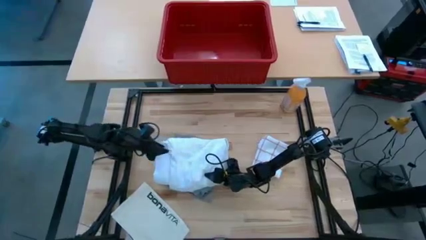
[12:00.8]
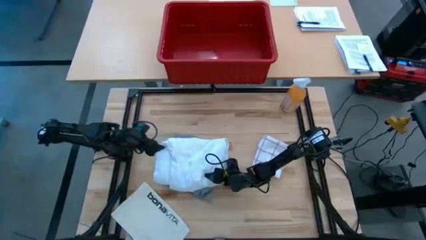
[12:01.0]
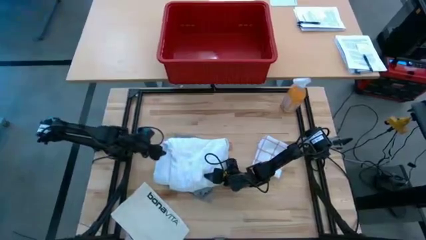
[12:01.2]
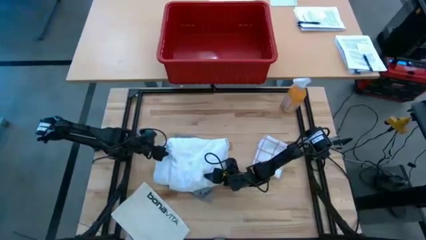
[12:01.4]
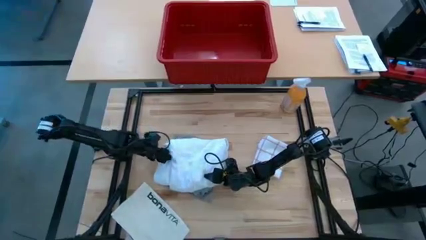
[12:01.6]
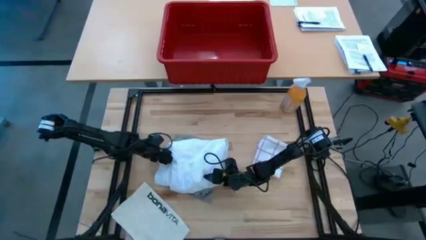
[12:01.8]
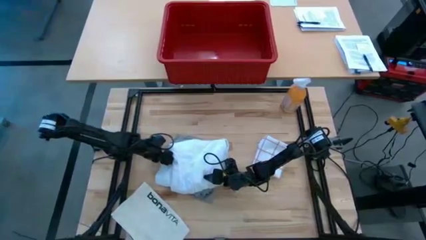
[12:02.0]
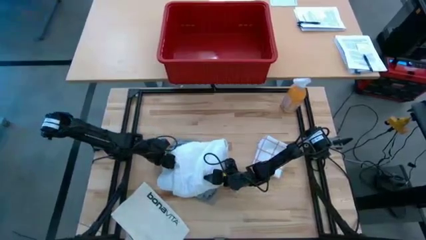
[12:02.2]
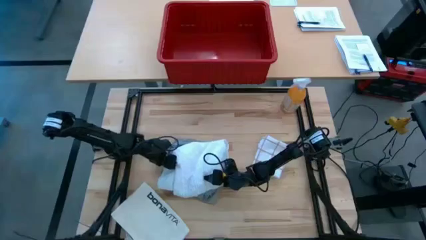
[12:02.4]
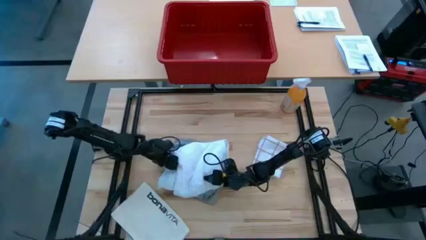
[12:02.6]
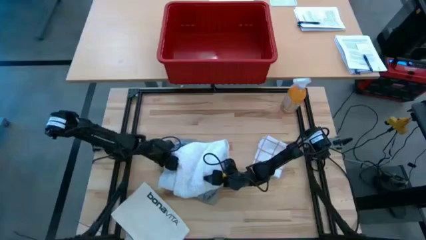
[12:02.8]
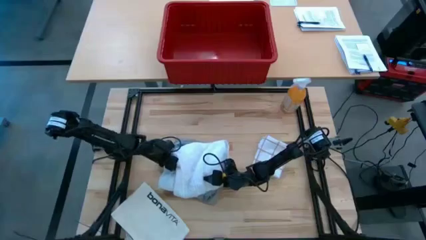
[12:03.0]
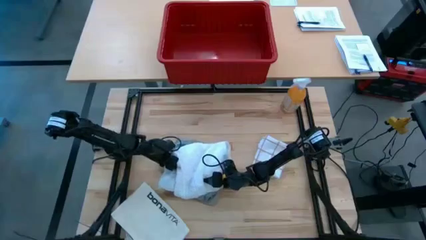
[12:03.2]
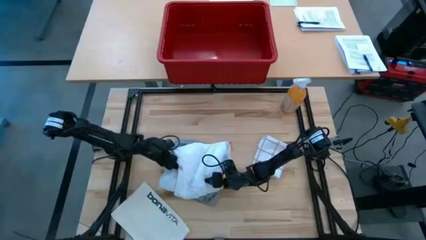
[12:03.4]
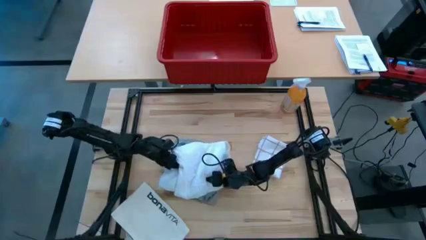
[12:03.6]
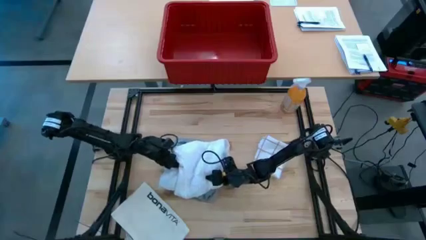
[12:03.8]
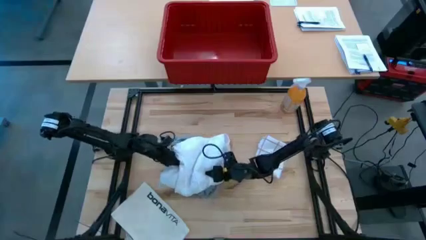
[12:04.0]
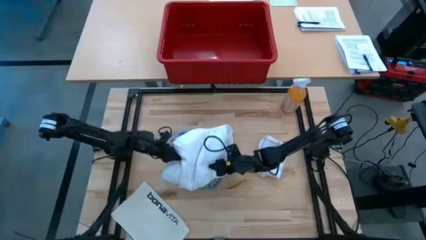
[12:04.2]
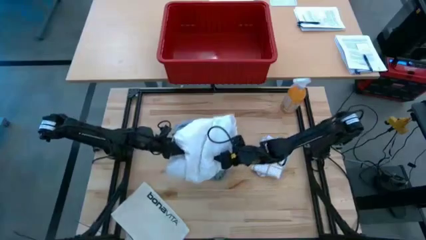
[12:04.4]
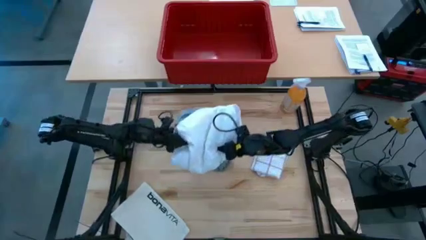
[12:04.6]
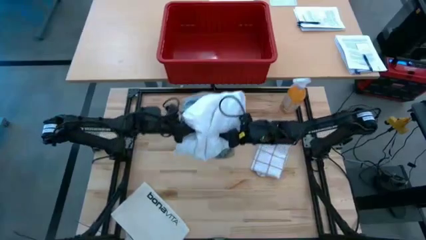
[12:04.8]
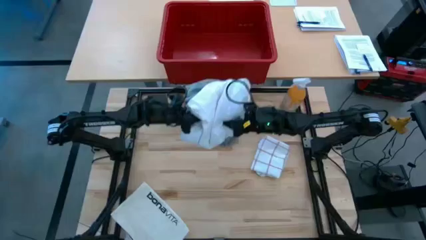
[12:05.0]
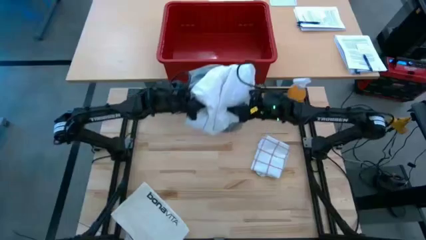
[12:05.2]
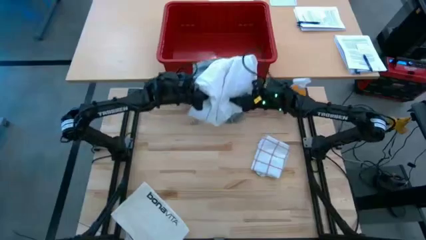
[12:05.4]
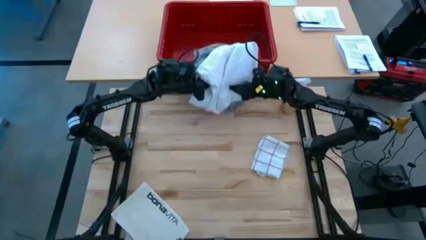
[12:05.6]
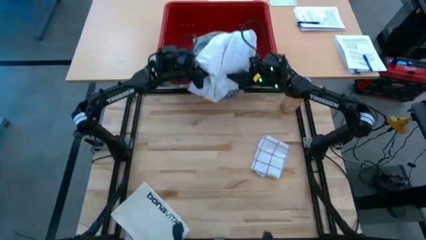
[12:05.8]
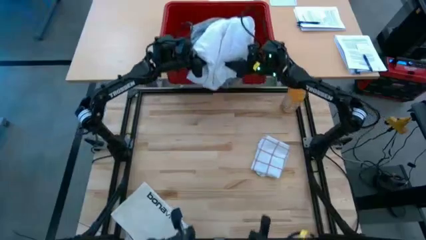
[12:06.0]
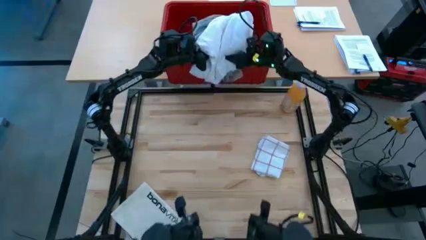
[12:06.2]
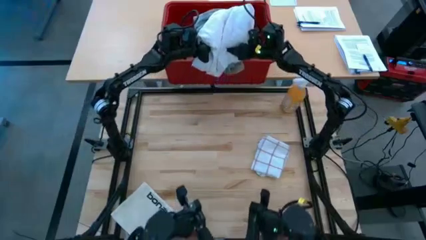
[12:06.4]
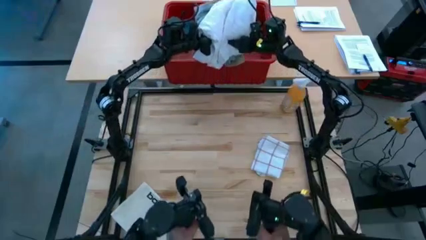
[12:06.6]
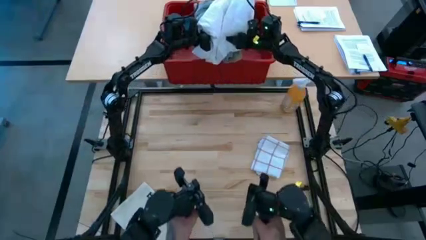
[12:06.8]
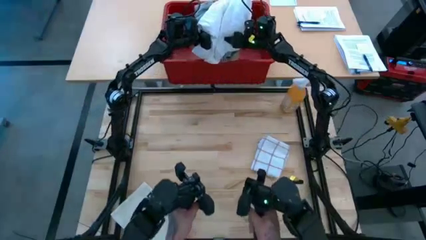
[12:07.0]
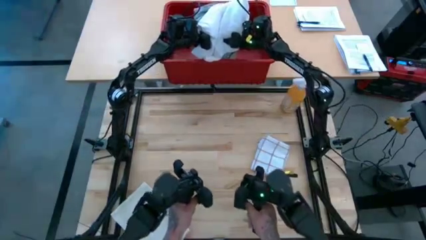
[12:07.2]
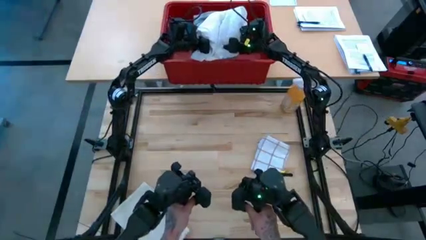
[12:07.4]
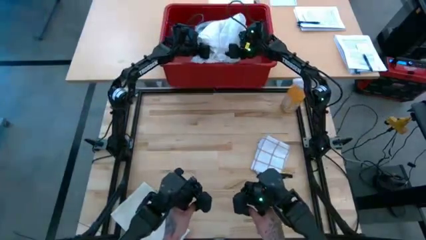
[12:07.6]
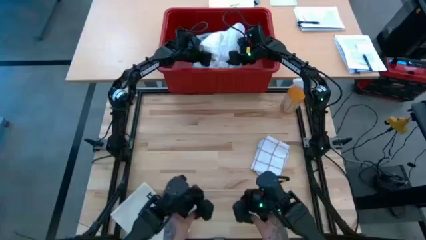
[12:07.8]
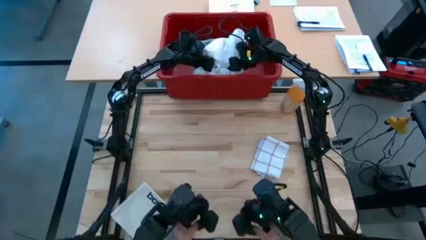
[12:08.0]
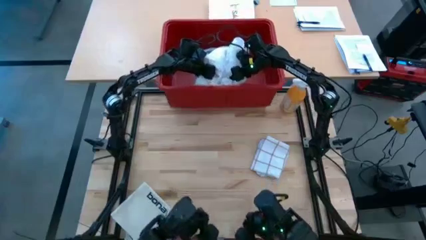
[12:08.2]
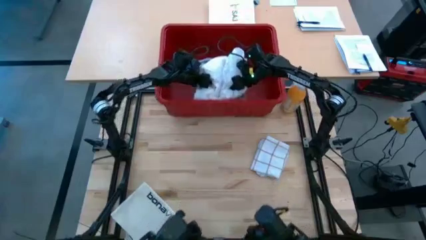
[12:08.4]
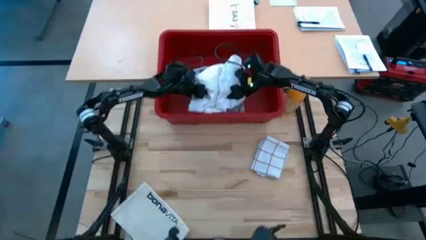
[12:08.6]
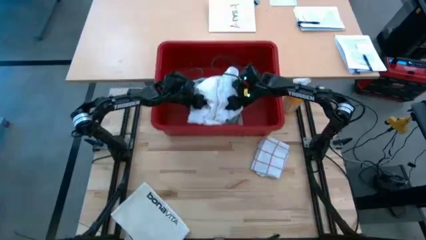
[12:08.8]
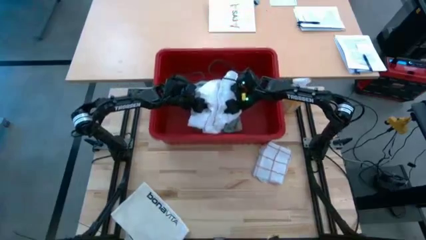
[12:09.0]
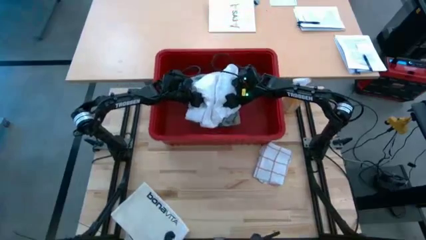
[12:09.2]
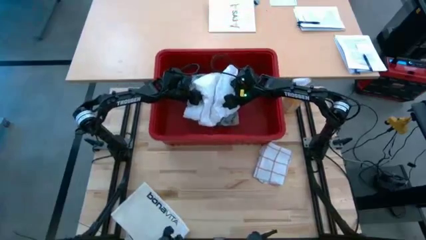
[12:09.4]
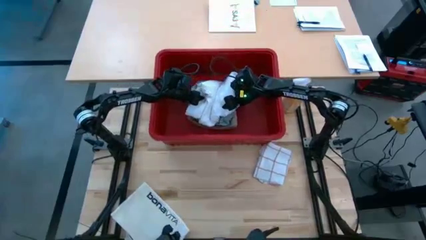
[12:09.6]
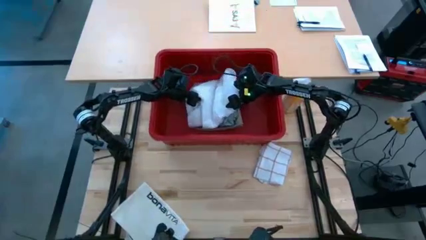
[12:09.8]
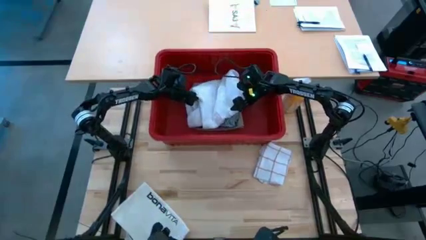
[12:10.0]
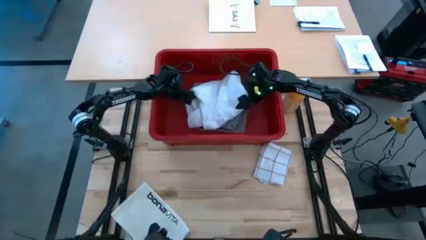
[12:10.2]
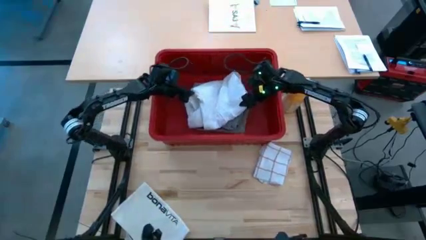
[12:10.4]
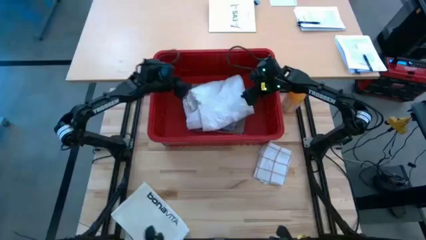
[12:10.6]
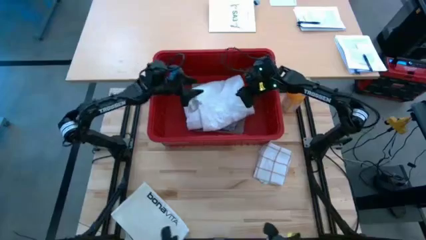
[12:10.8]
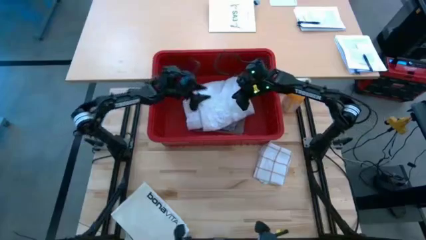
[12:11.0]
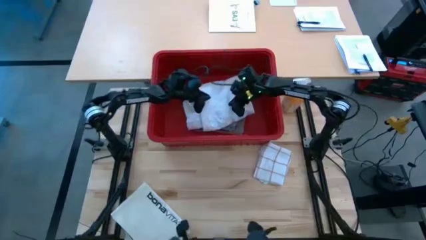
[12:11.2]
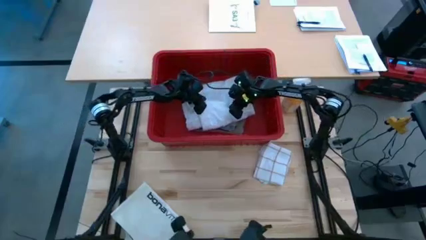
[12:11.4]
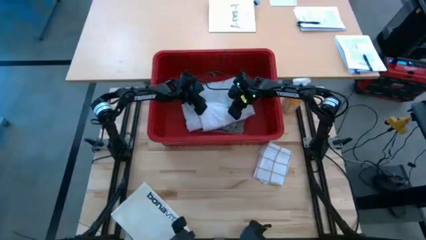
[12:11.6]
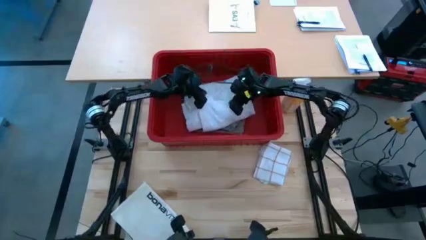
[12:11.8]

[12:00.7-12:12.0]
Task: Fold laundry
Put the stack of clothes into the red bin

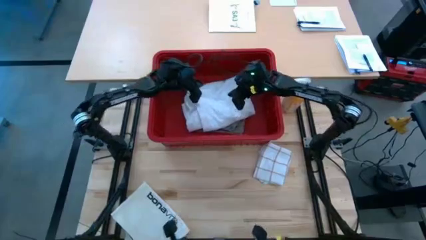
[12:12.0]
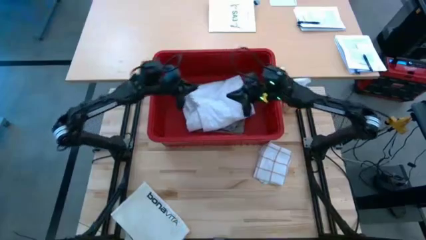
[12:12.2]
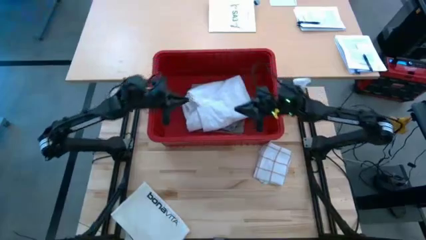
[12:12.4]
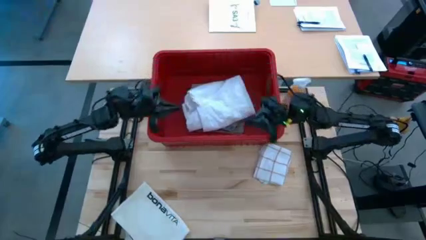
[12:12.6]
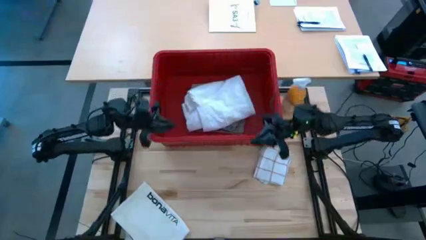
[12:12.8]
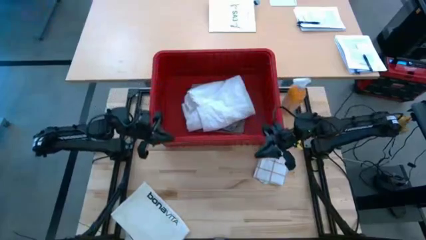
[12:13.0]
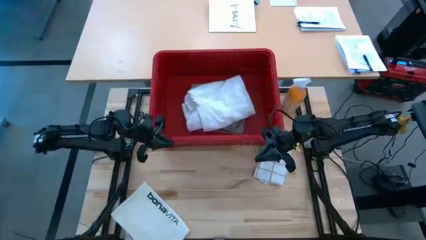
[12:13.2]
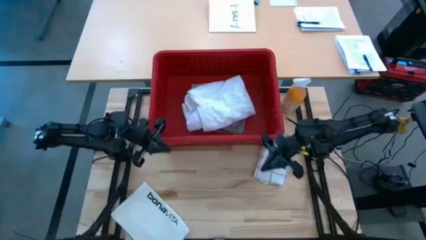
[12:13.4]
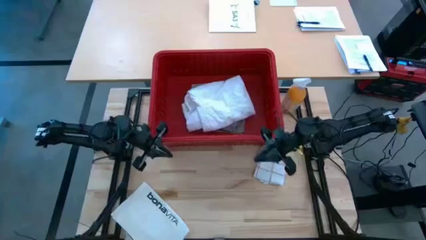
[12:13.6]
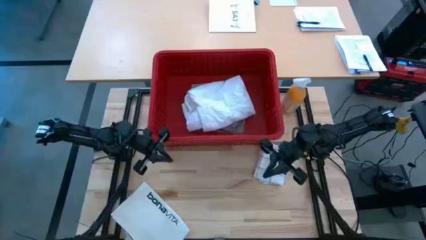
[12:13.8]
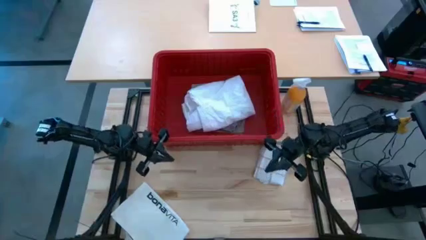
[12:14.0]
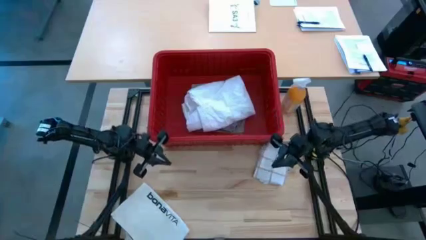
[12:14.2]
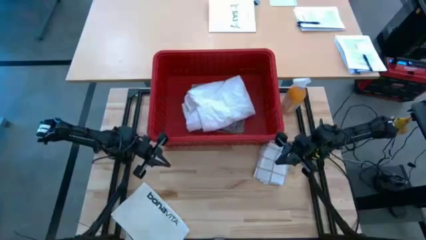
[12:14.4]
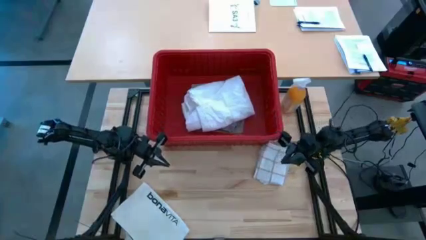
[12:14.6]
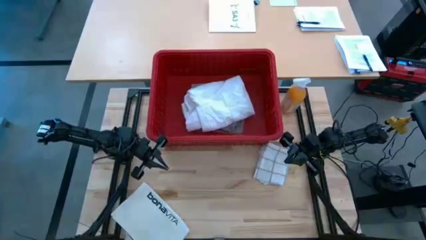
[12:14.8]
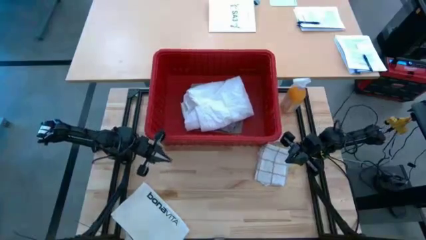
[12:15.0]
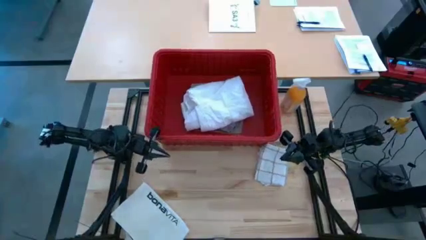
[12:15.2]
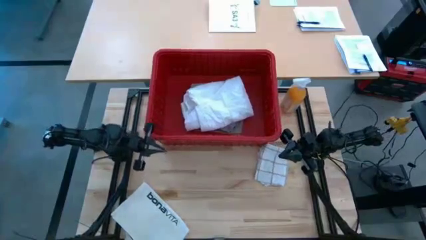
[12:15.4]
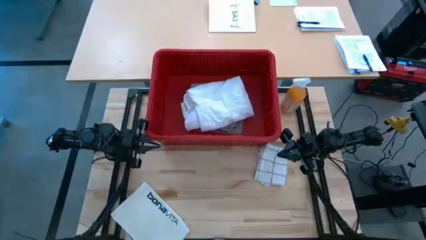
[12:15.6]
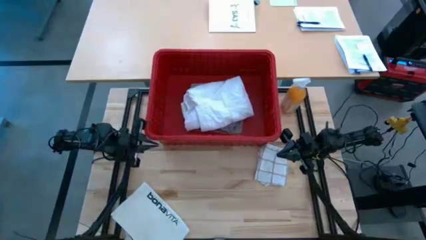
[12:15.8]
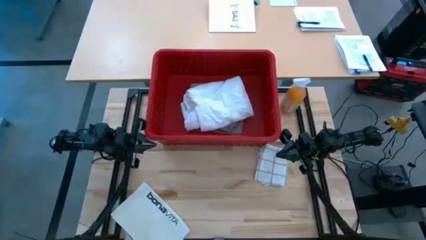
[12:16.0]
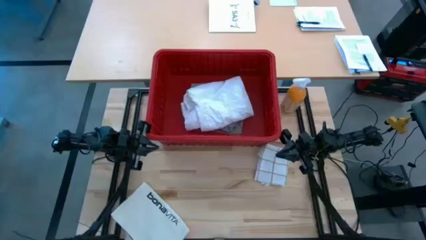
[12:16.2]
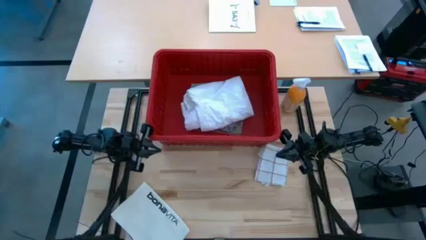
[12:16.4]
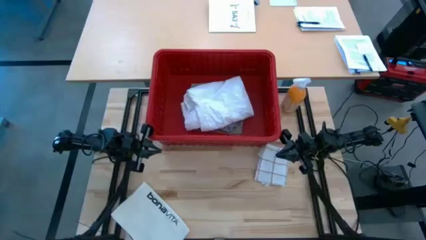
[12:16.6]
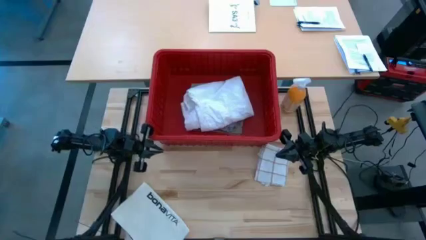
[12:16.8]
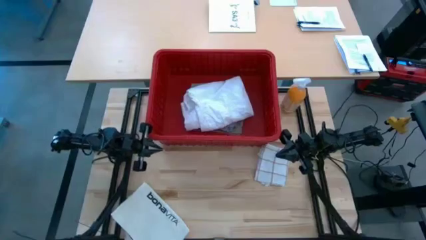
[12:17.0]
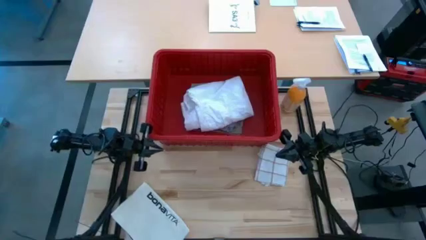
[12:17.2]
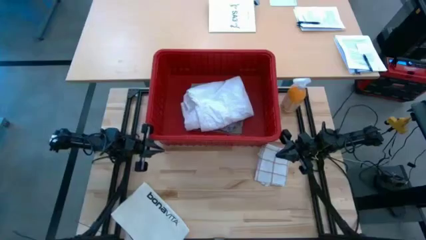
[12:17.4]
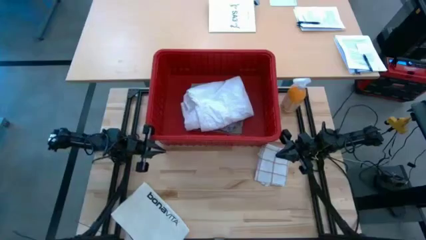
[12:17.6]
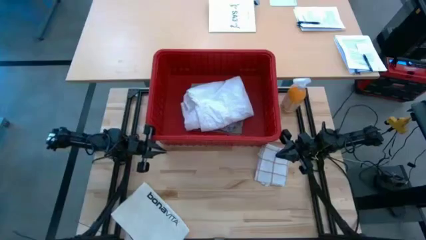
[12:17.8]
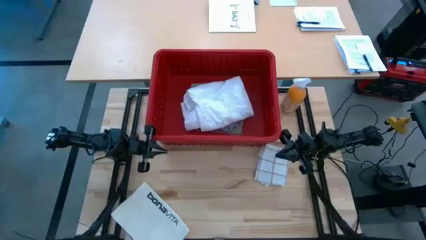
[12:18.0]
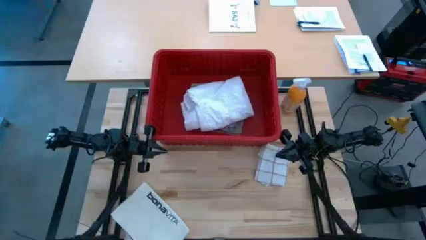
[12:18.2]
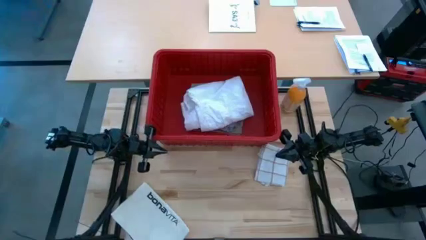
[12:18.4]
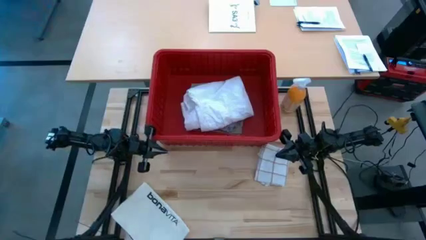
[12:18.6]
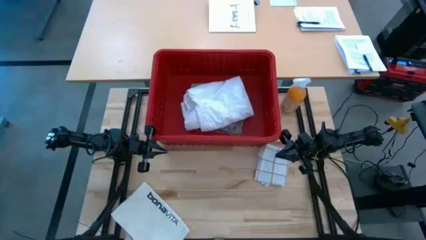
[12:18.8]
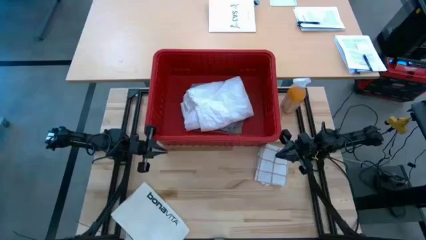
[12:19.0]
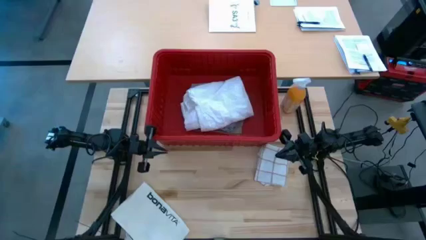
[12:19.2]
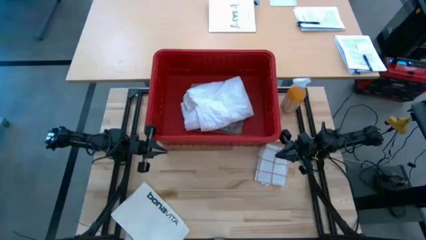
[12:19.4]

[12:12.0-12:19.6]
Return to Home Position
